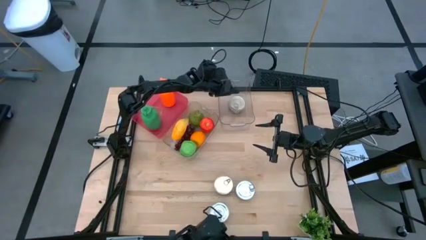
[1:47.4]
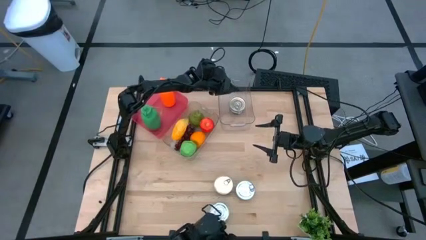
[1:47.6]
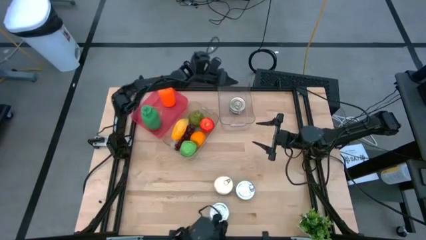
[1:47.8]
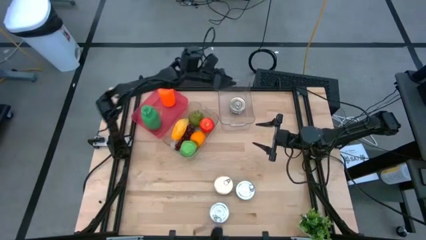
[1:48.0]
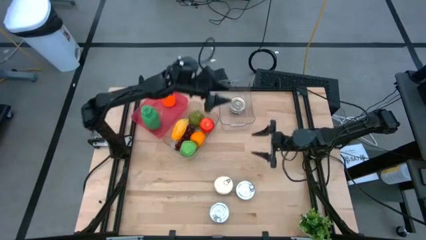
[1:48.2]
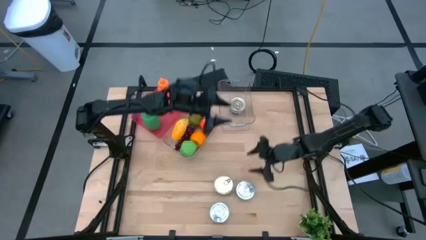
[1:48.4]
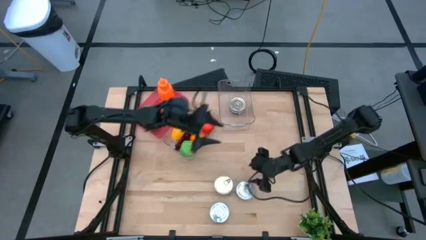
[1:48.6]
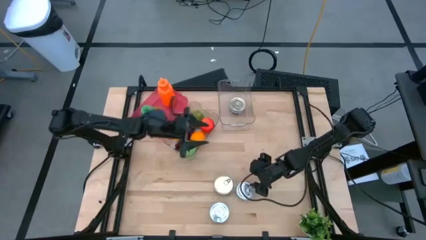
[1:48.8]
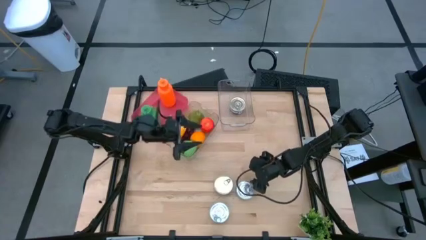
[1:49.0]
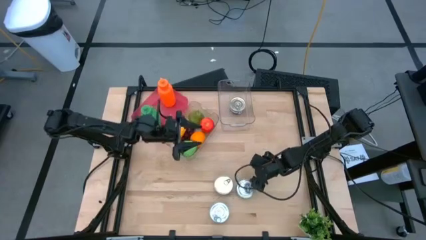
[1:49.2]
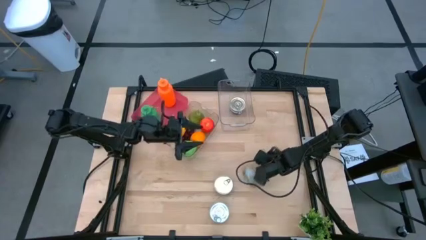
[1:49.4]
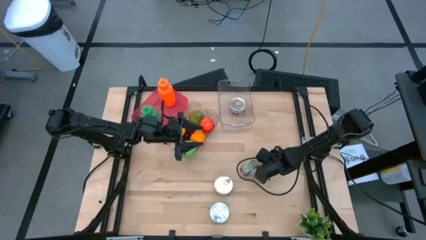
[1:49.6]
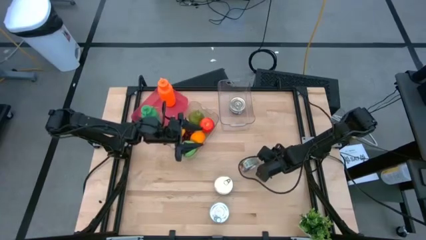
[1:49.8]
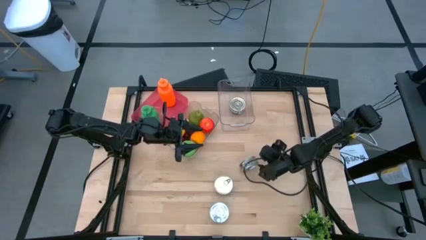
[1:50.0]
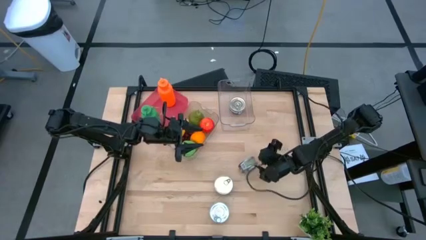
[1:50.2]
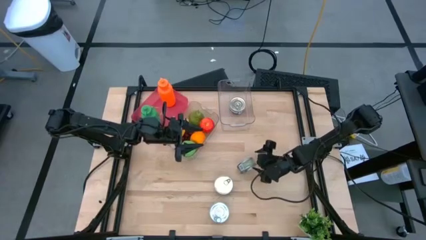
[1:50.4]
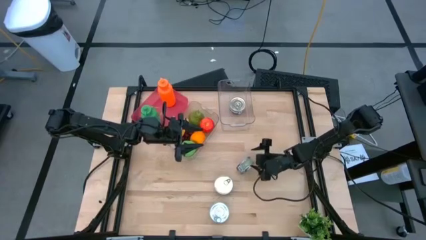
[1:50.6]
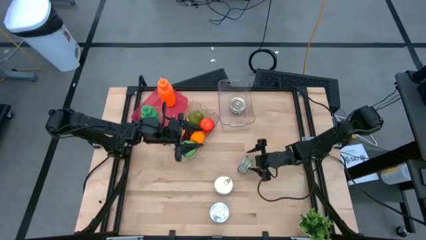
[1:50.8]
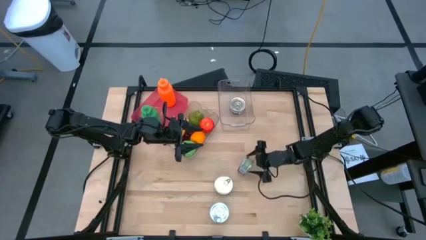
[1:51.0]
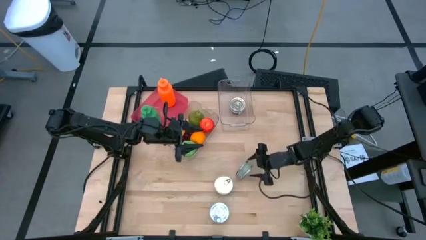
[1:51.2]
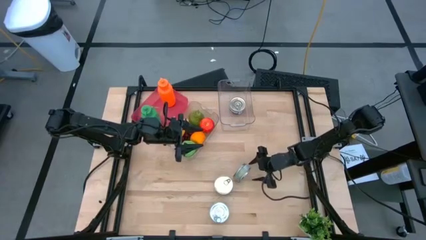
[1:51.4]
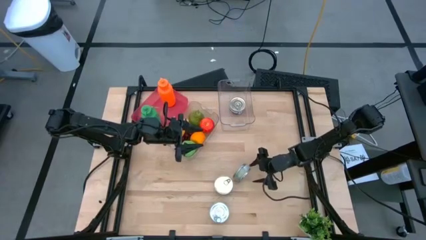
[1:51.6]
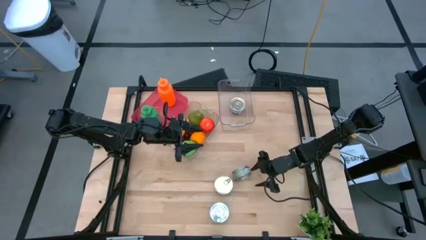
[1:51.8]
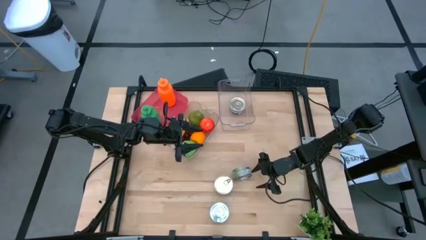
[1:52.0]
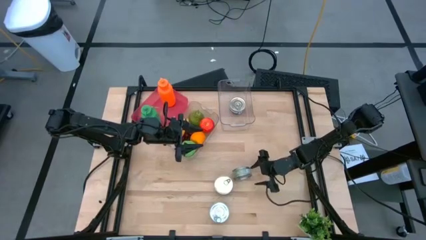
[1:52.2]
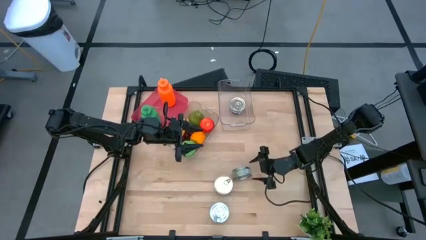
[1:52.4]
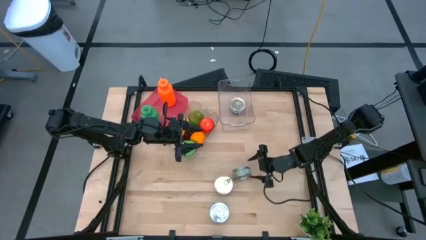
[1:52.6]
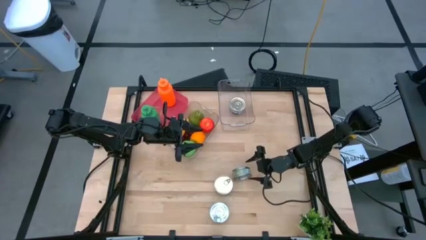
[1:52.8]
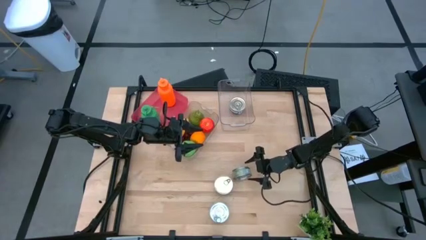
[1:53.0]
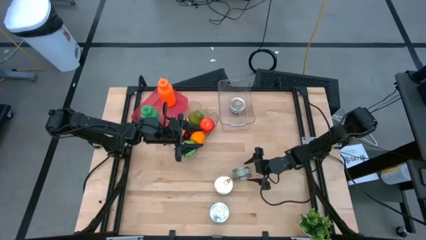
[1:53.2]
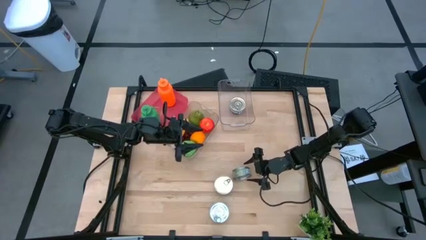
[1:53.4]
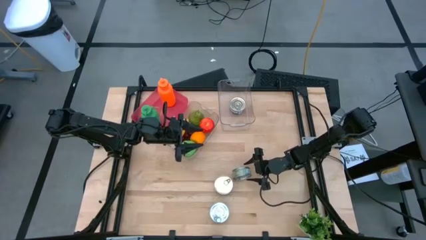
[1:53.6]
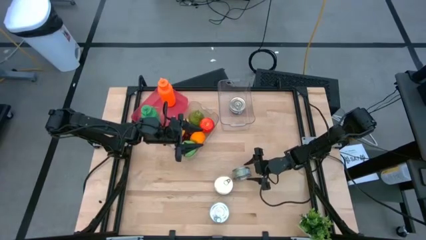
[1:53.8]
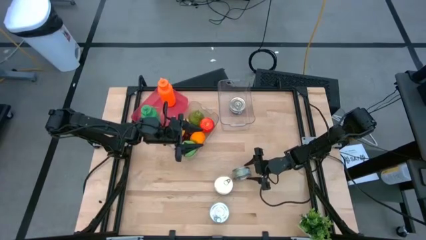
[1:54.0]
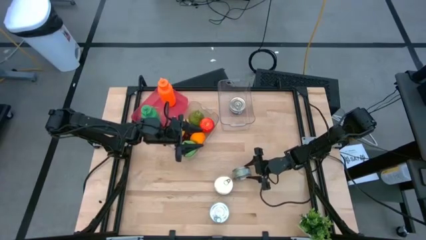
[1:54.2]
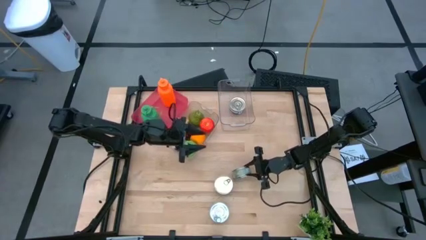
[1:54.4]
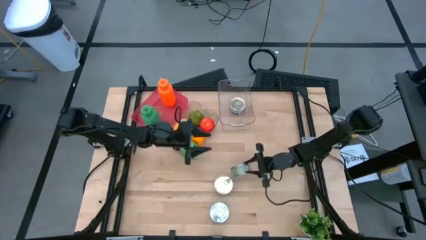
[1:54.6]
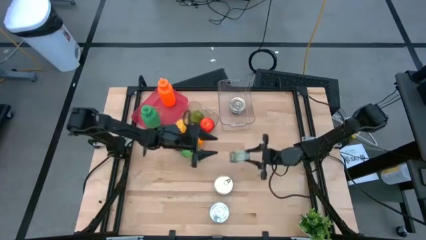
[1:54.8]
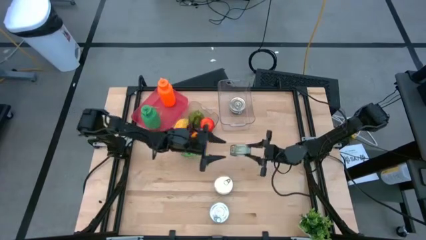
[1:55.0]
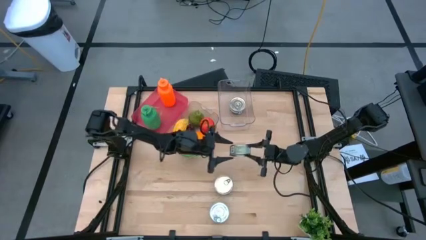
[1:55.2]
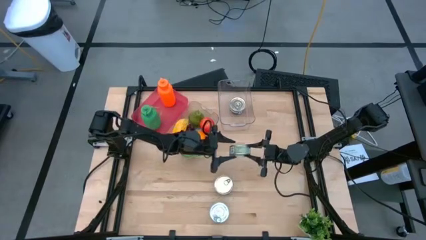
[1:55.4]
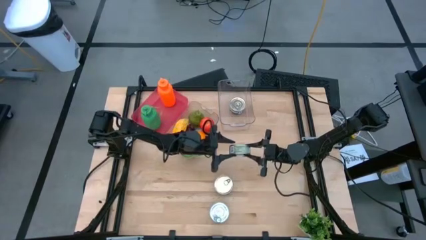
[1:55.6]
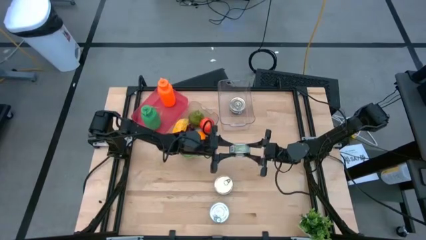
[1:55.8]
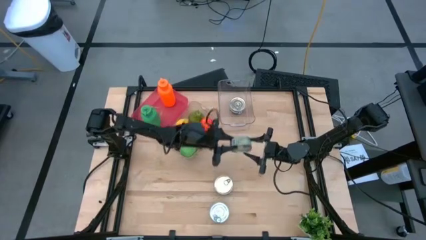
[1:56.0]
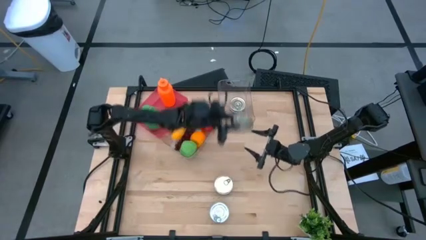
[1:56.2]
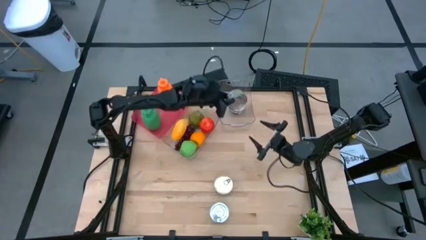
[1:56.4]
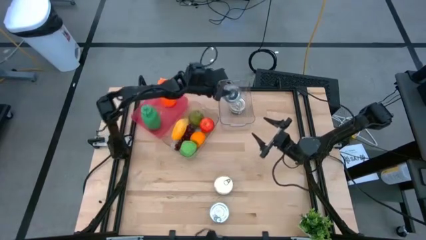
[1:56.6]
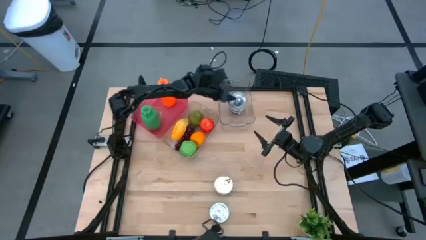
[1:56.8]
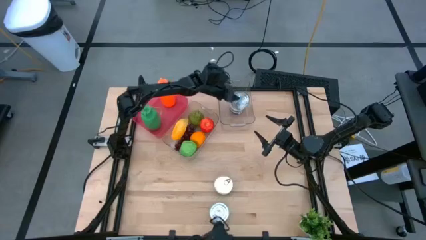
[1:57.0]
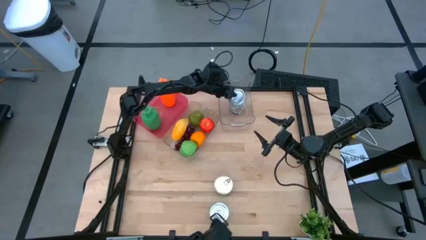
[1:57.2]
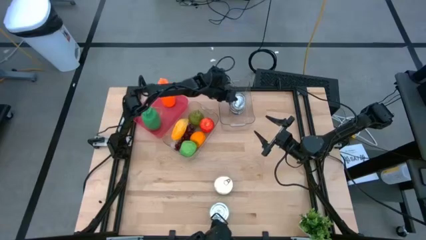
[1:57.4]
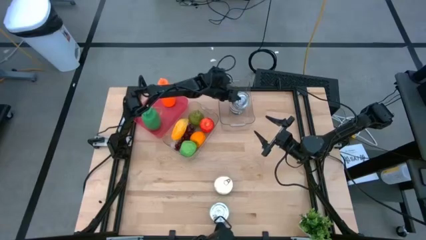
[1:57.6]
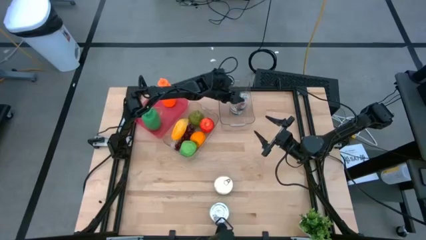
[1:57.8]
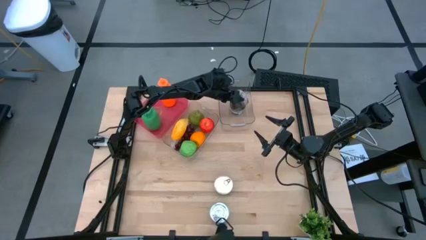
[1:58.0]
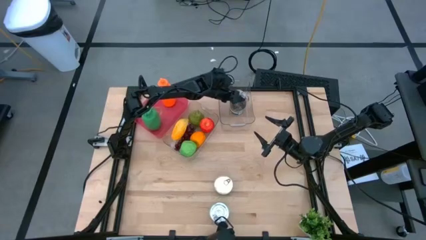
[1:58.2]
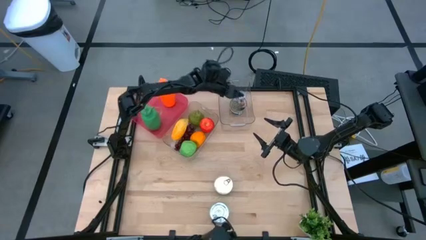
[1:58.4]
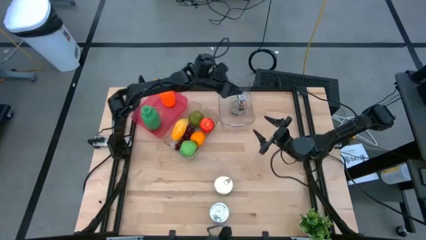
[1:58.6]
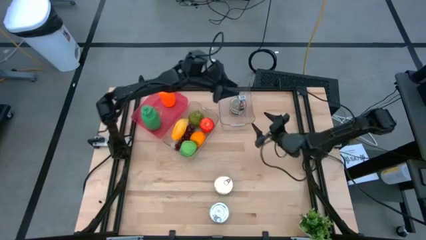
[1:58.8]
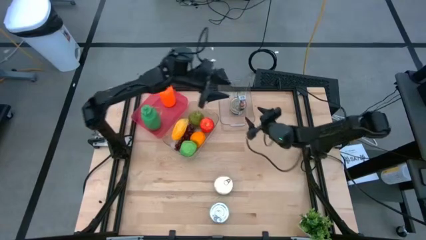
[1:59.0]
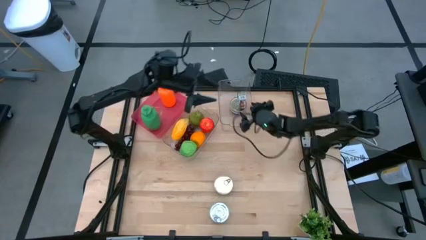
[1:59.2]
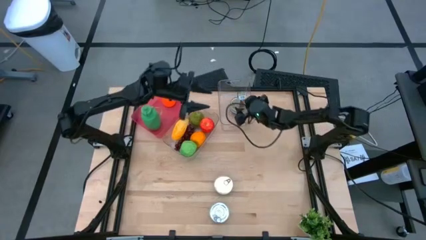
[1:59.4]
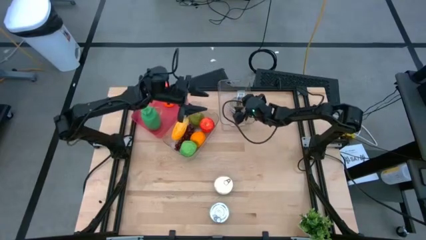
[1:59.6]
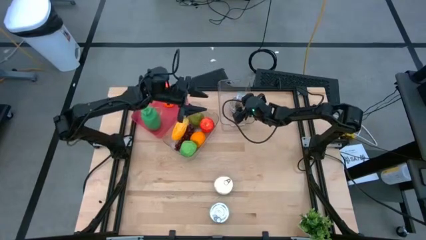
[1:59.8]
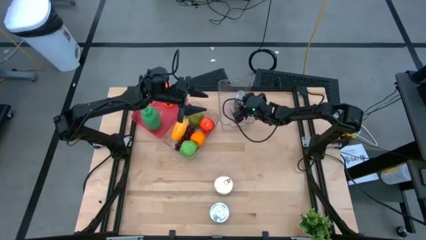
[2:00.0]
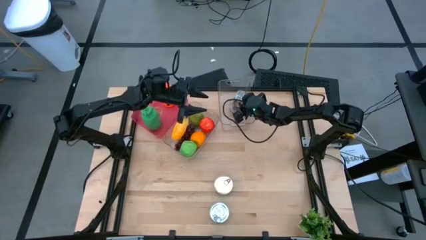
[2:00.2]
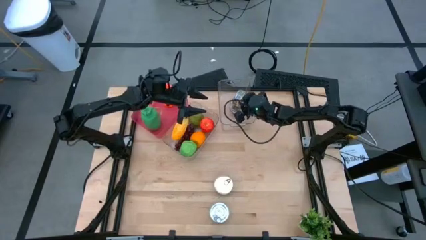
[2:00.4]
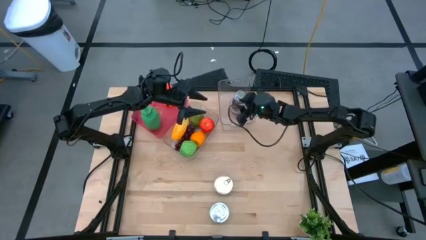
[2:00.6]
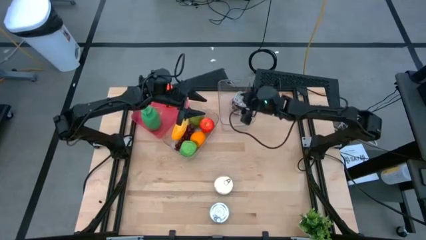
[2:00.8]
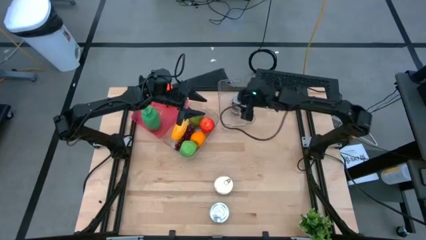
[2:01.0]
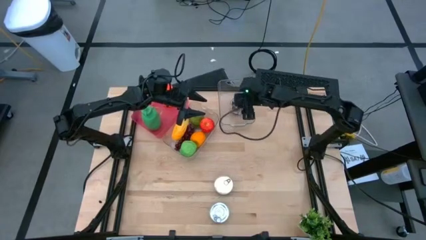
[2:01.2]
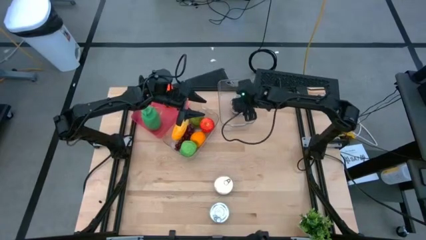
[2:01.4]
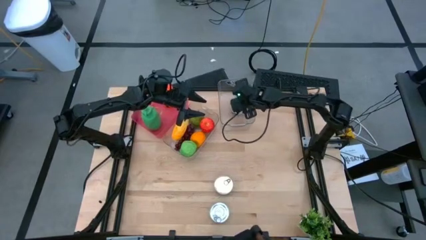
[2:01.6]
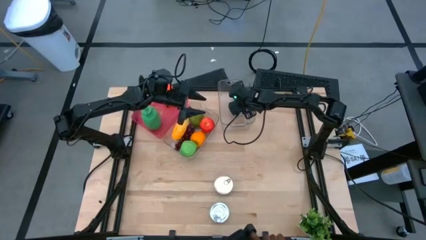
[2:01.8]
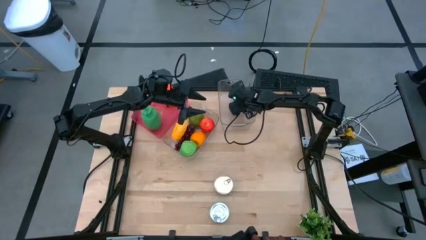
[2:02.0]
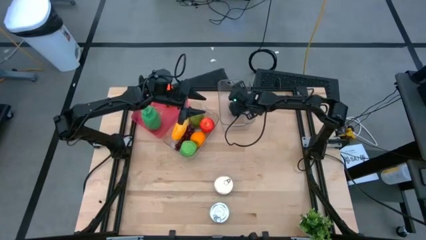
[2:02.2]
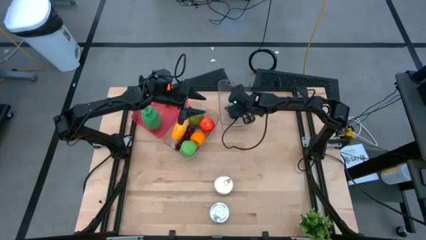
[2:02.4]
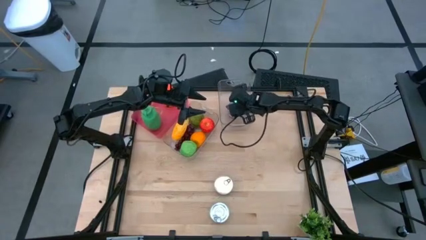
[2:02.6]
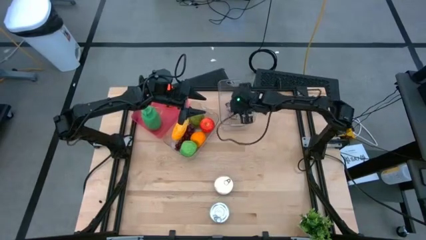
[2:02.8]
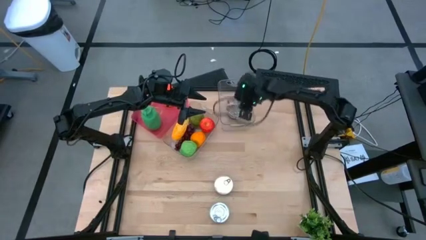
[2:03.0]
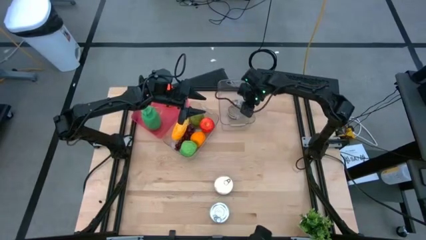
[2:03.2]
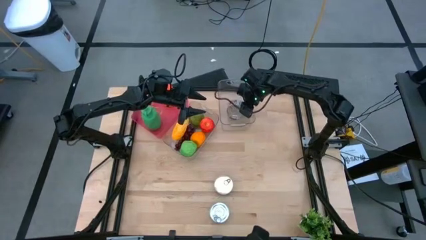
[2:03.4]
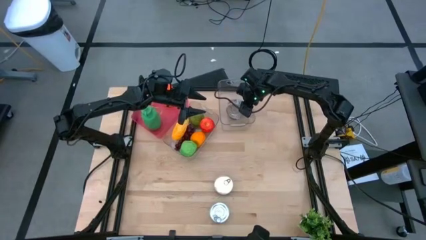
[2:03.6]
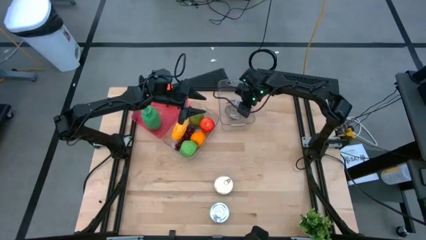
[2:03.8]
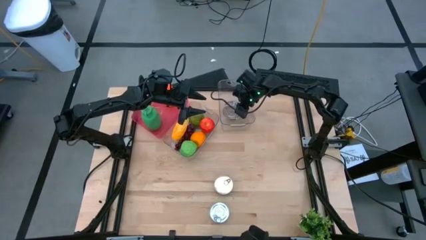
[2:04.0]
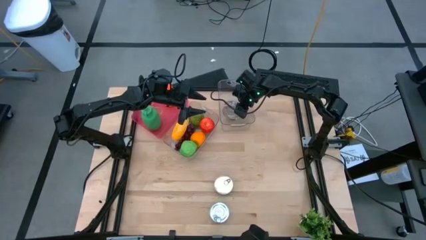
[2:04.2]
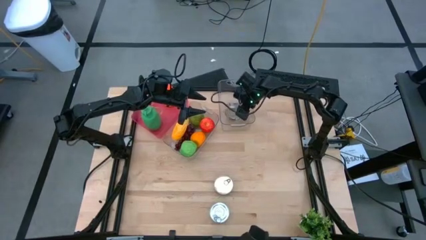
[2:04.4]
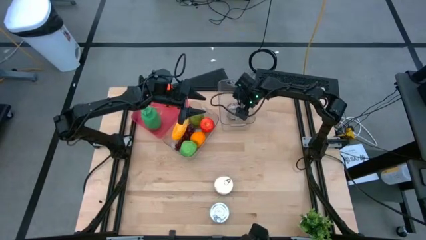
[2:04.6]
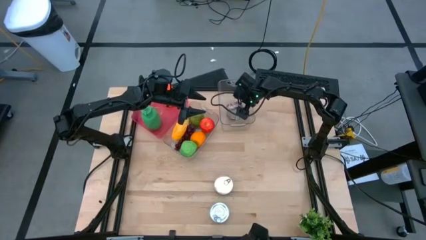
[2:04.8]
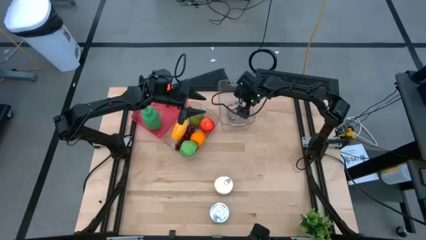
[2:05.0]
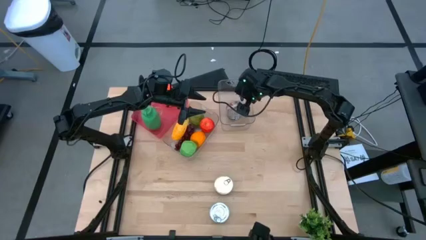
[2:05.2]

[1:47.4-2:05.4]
Task: Pick & Place Food Item
Put the top green tuna can into the right transparent bin
